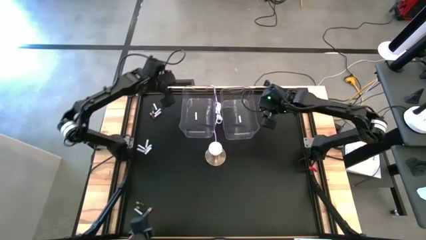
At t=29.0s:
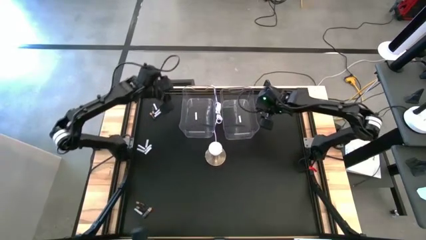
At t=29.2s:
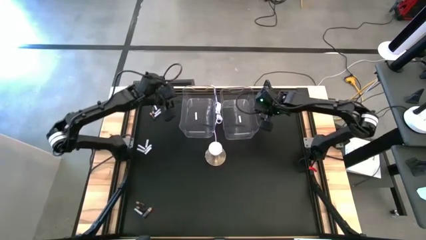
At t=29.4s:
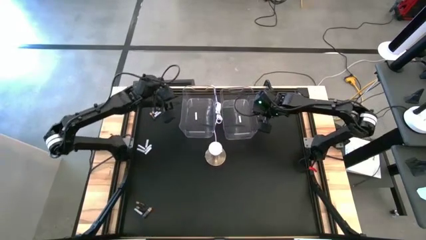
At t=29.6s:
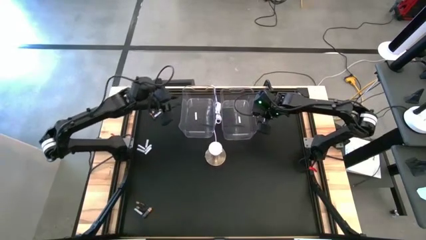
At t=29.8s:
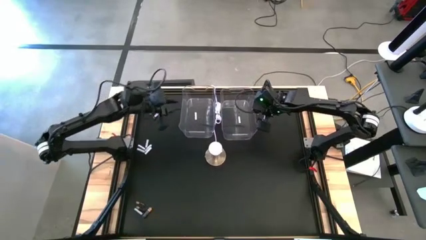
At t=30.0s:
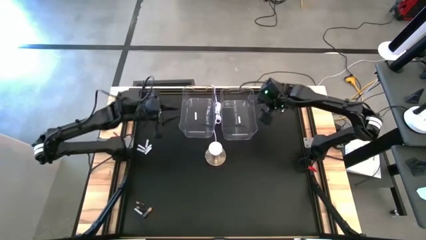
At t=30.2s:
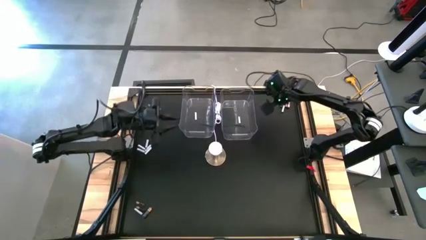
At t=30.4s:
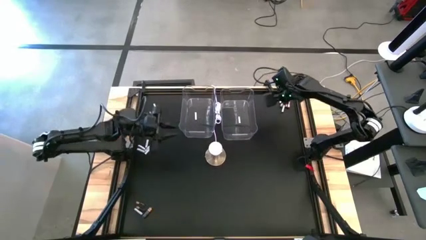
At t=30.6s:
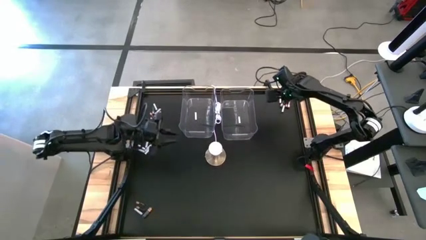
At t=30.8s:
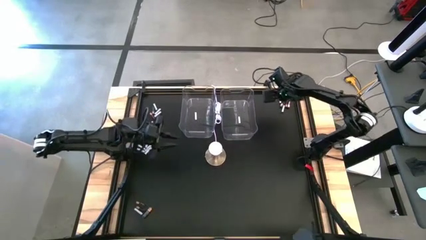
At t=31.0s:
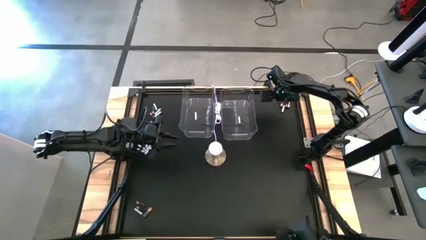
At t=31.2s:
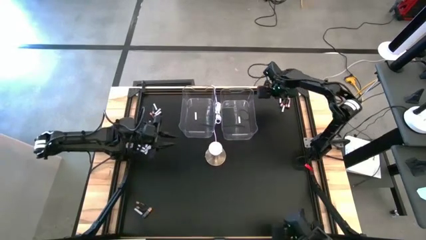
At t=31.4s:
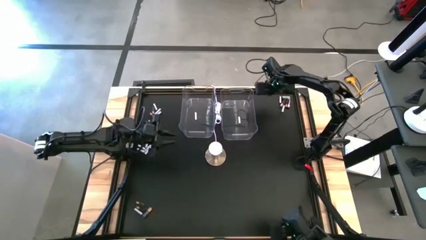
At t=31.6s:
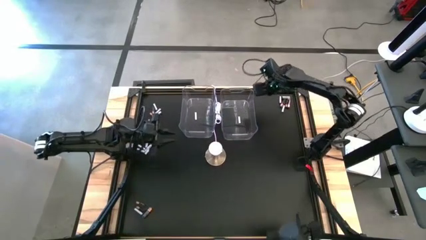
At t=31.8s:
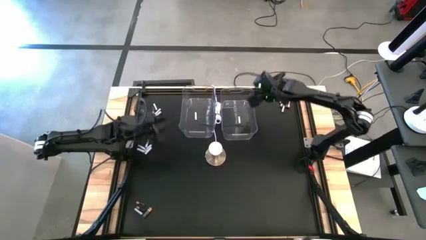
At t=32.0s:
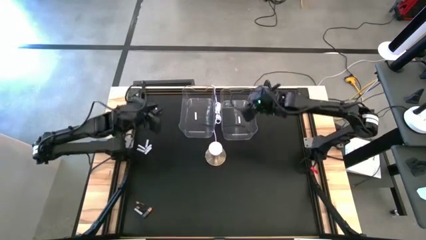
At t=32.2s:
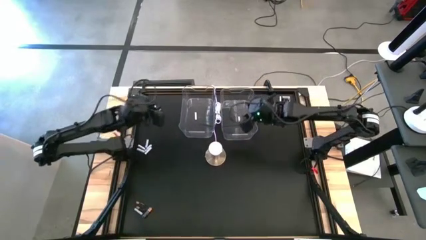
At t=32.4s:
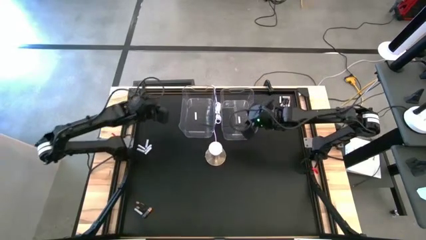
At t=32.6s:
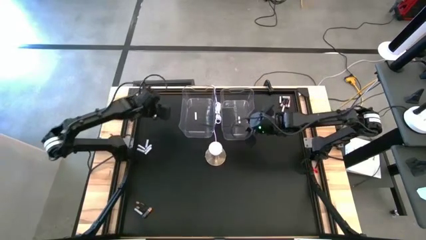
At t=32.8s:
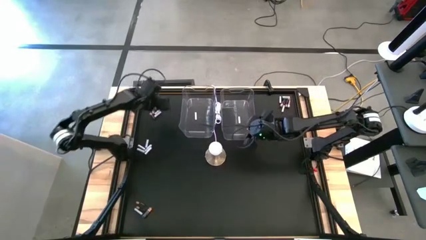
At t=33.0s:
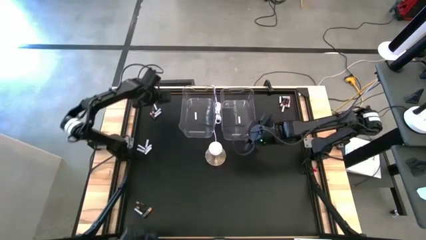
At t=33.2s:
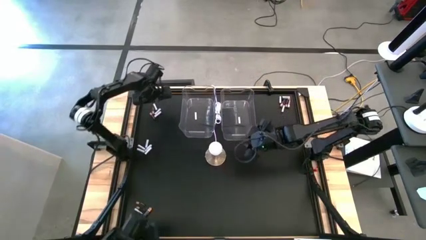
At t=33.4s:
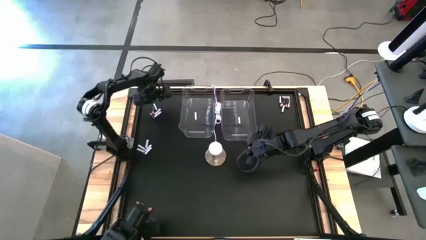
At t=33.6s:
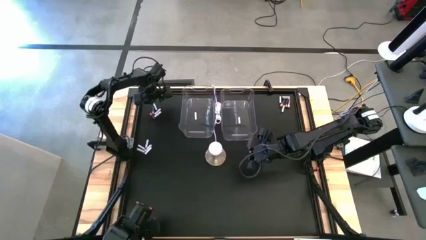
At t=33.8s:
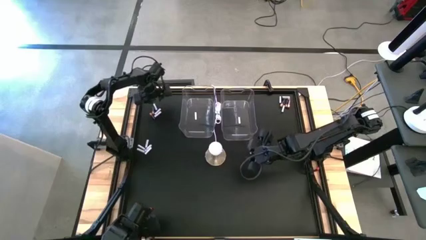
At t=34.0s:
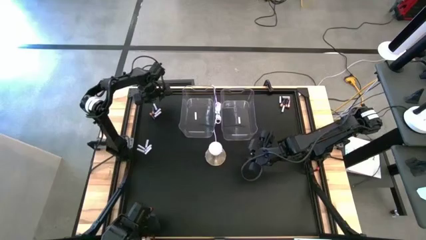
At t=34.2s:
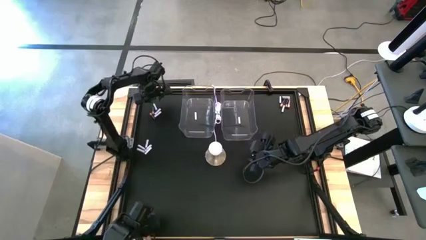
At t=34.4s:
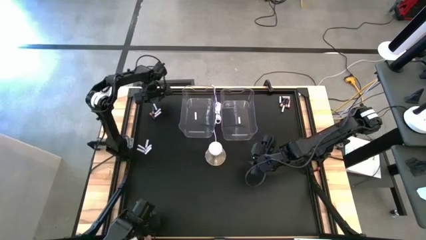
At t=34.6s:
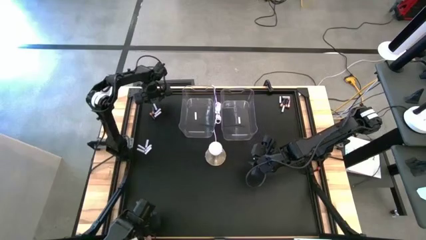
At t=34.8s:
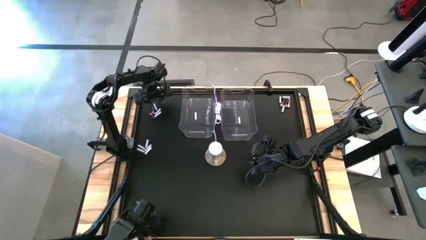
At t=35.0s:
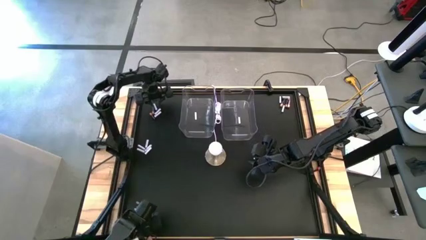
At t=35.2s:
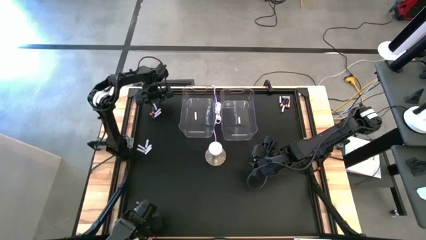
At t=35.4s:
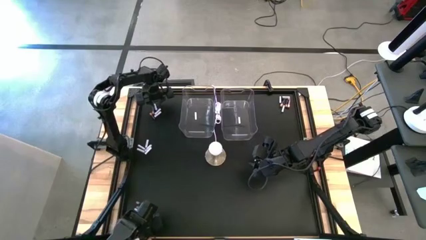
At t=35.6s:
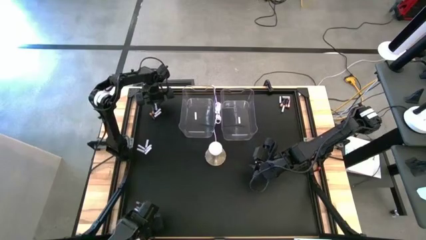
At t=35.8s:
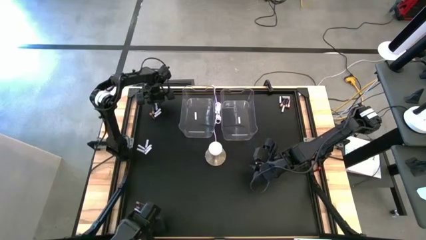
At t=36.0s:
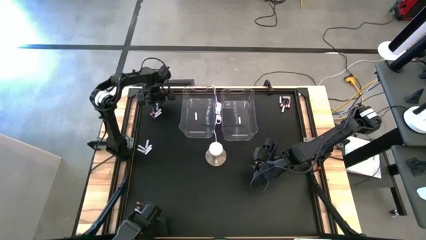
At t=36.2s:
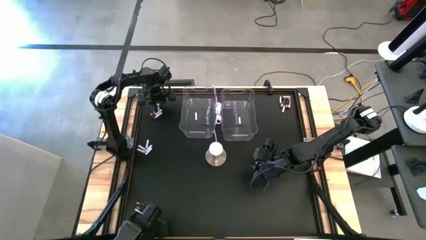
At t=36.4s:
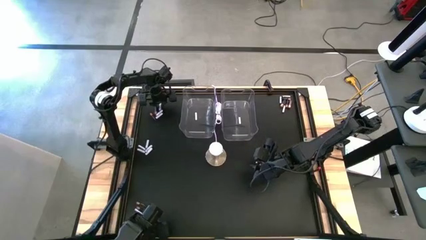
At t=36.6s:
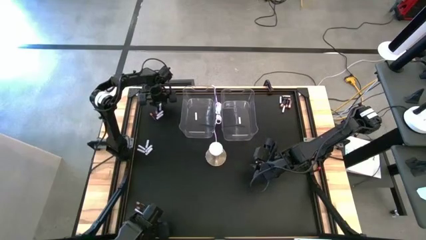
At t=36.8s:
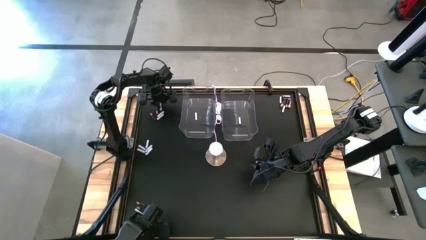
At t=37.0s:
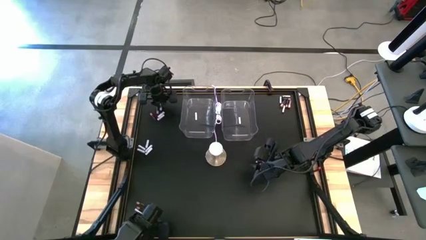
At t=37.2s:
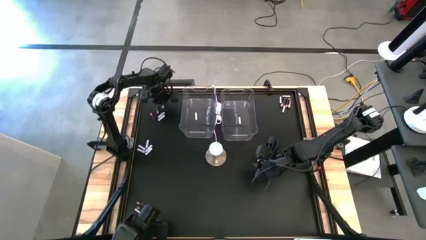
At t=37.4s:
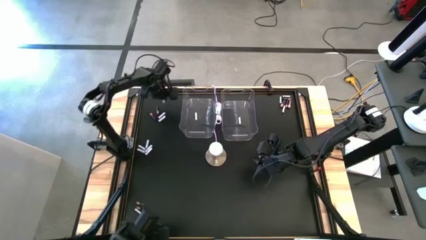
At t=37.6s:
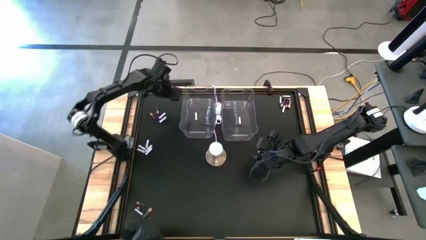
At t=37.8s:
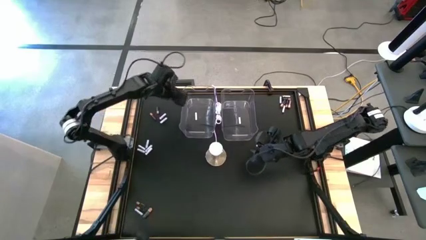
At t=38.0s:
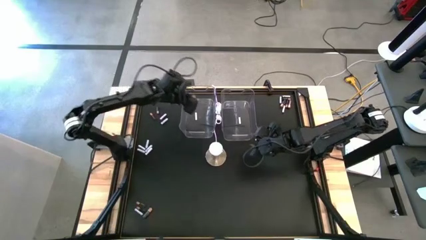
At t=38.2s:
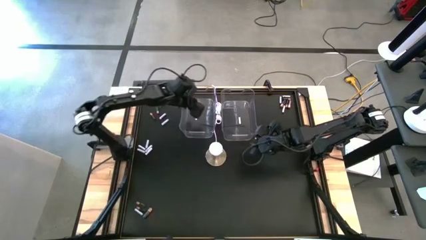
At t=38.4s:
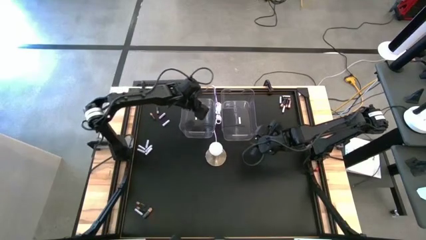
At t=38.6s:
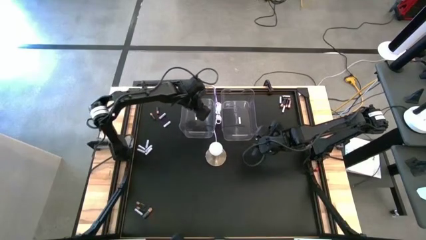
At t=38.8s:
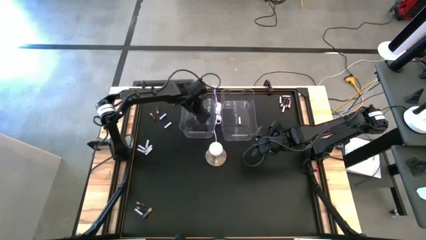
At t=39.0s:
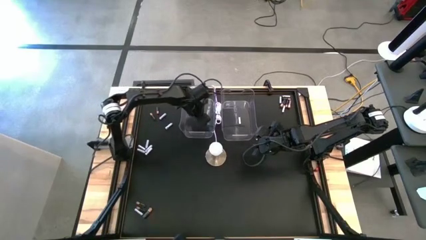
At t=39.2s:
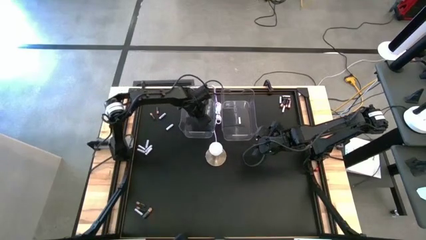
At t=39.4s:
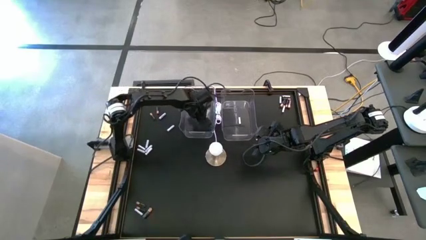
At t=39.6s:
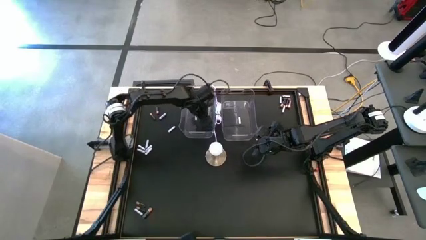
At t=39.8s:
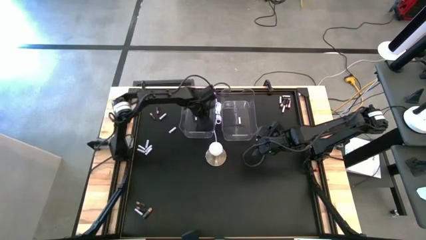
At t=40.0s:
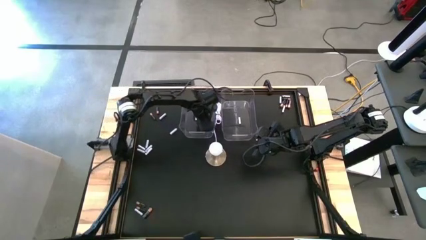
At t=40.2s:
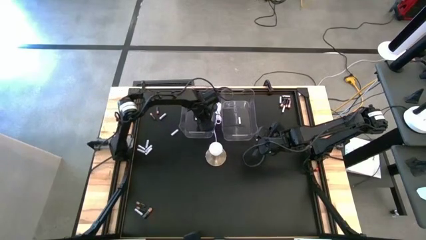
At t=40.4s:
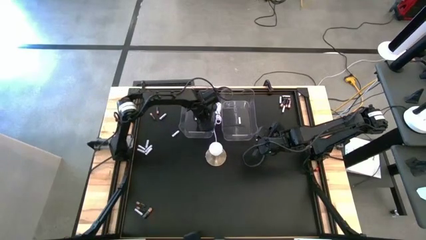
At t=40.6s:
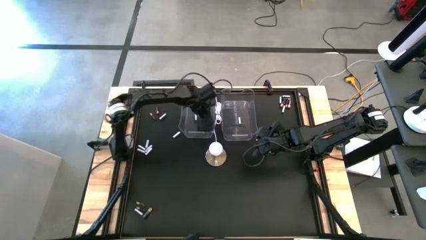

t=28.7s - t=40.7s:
Task: Sort batteries
Put the white battery into the left transparent bin

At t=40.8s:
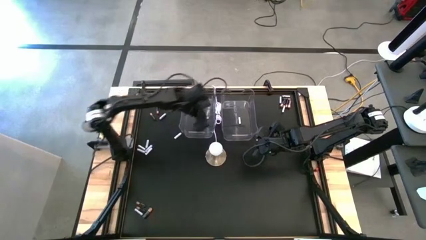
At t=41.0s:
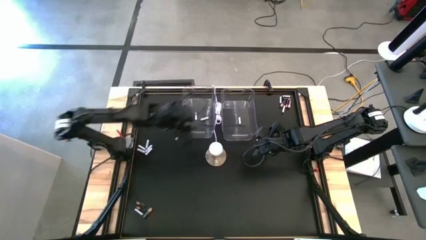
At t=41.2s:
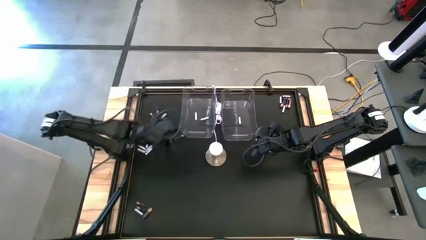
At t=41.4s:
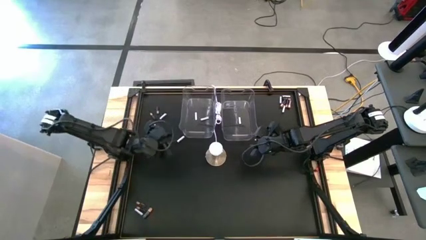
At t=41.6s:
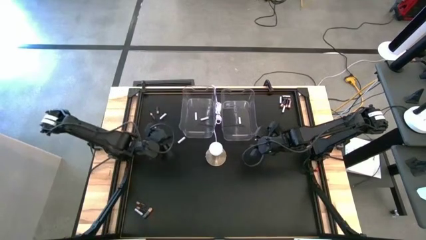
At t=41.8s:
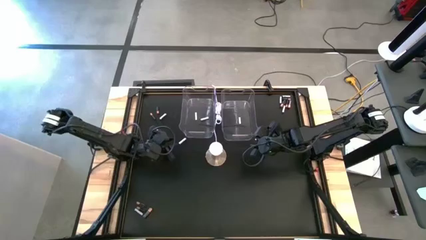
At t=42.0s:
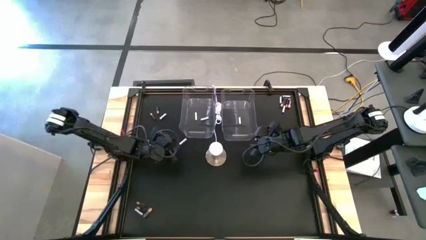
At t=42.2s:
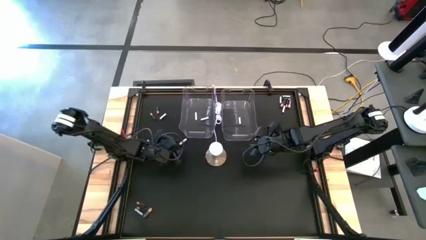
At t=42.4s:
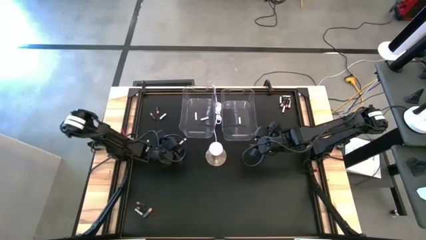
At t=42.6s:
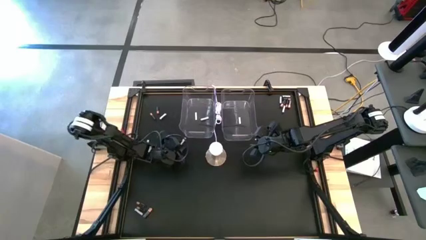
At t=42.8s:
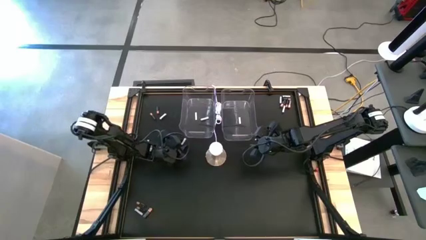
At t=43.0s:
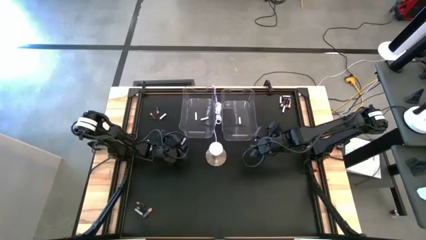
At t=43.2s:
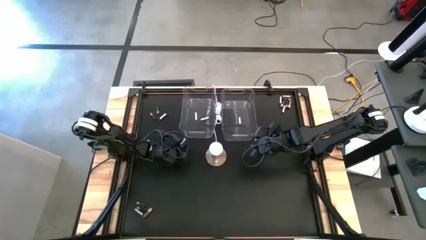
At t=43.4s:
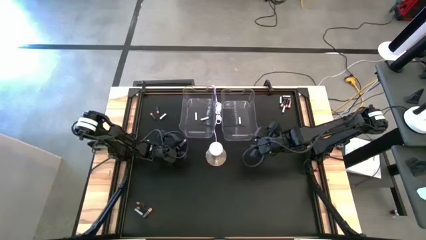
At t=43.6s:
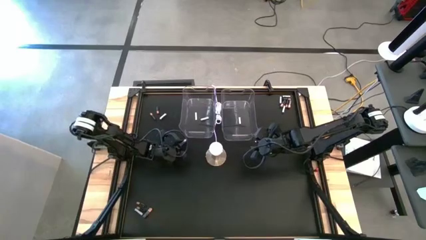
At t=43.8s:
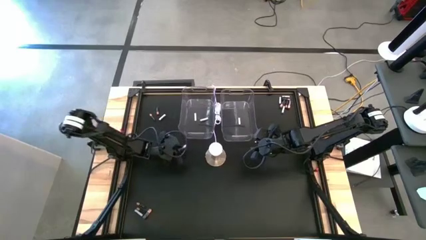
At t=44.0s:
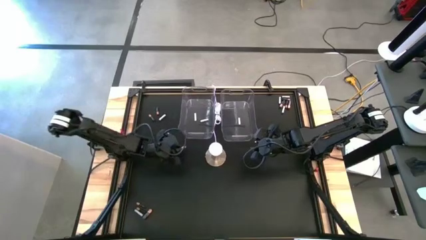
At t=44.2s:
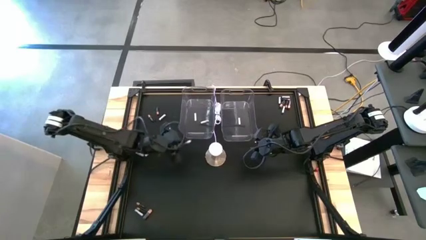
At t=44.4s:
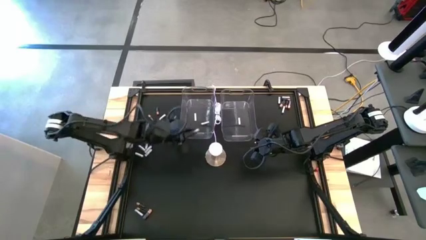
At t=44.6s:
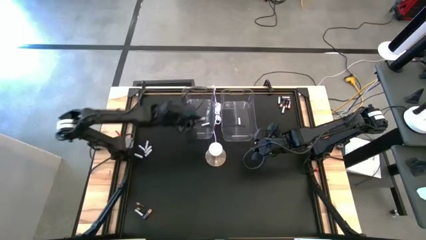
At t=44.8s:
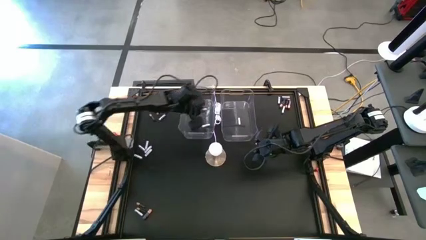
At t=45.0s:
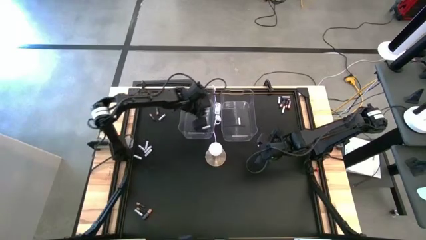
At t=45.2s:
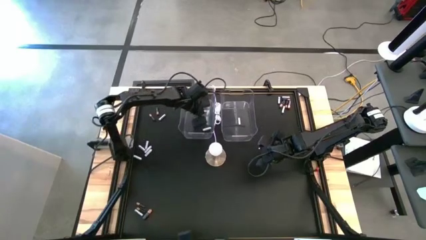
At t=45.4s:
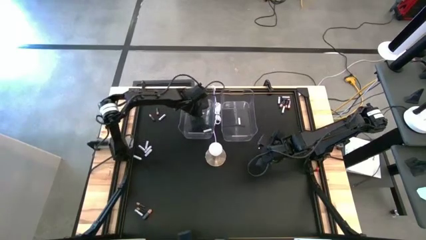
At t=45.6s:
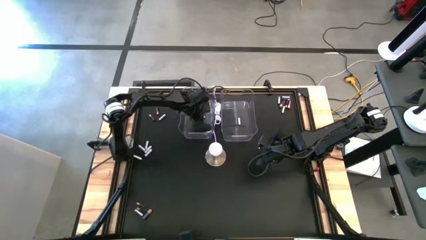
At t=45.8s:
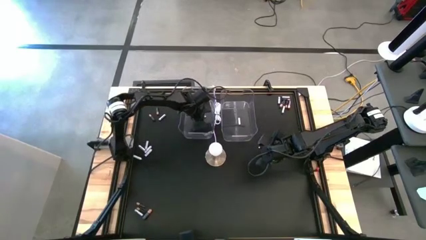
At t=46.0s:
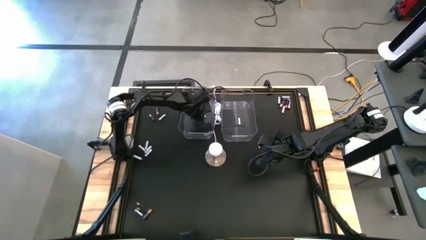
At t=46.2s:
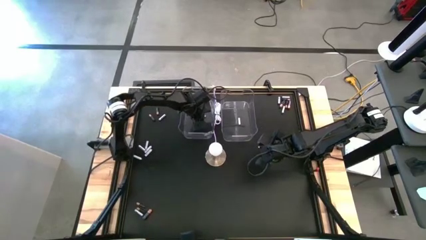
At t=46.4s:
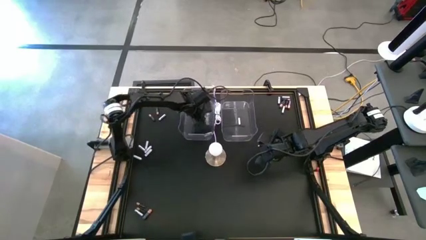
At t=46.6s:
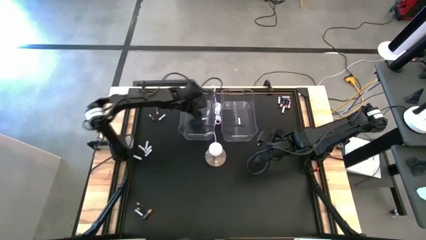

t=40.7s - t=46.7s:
Put the white battery into the left transparent bin
